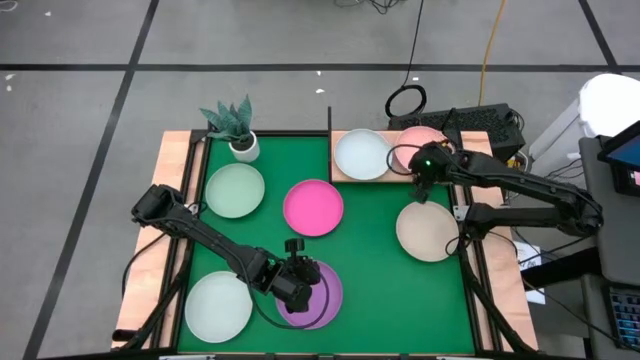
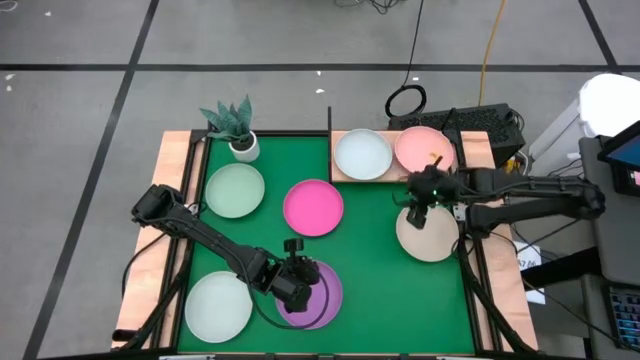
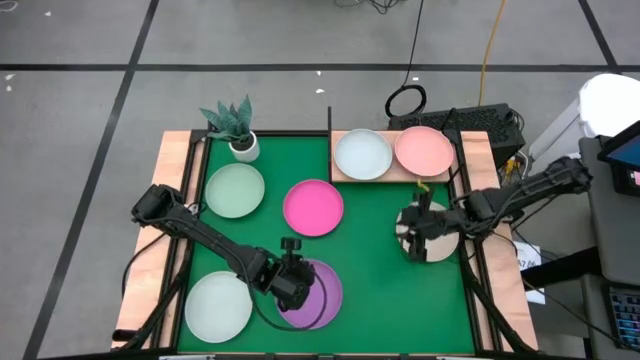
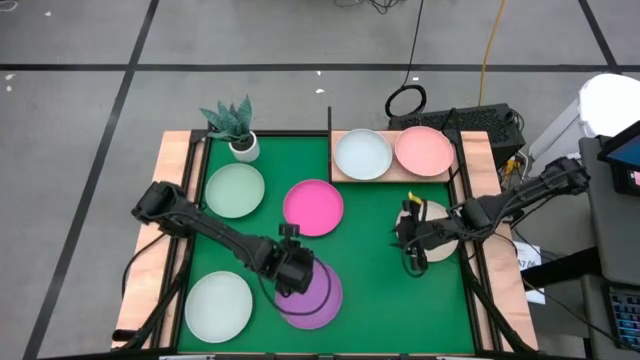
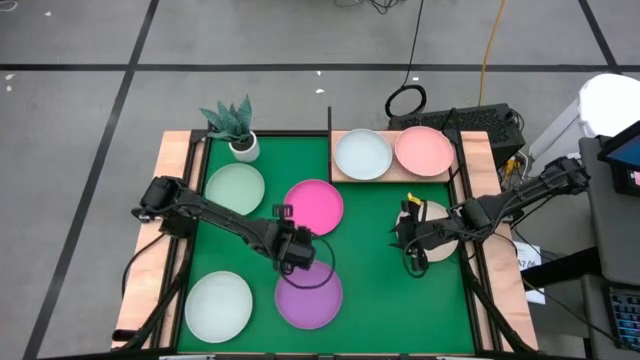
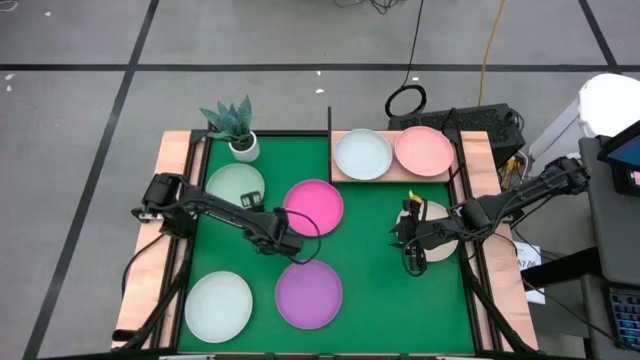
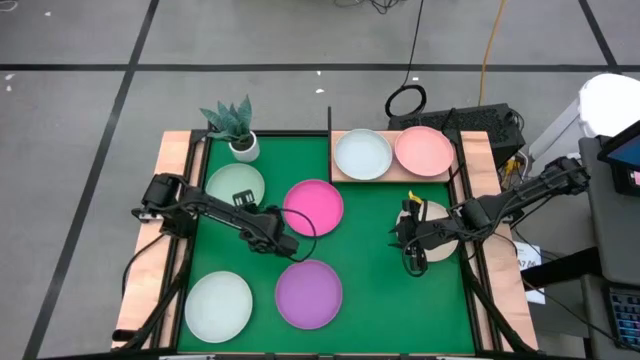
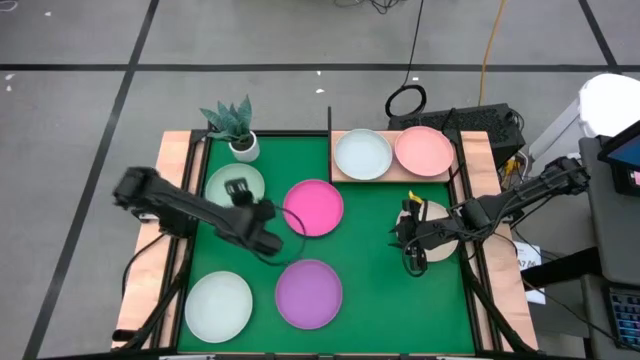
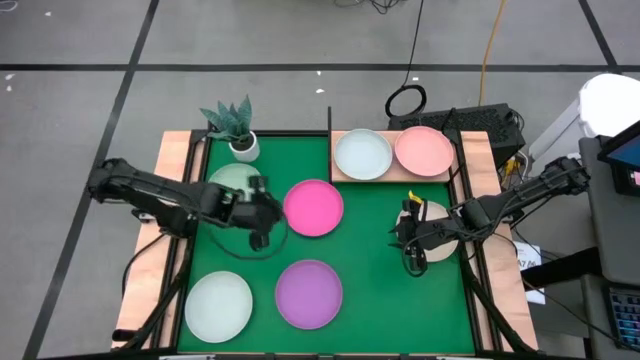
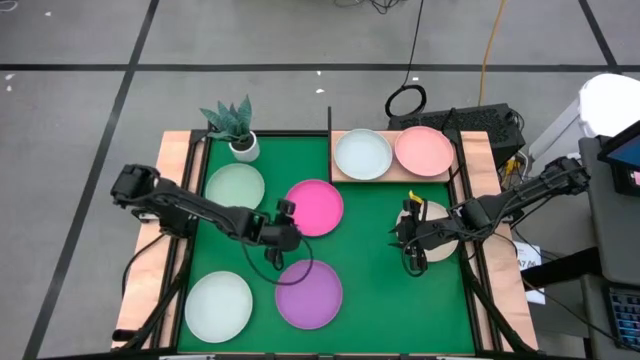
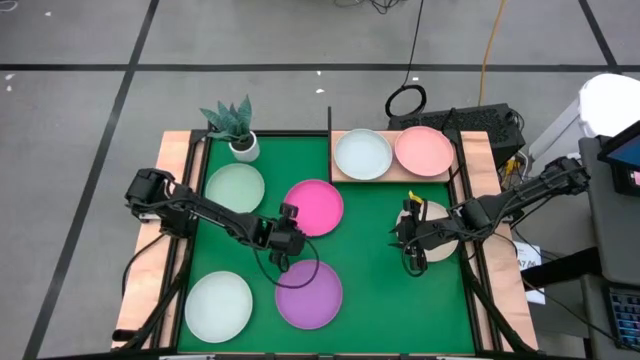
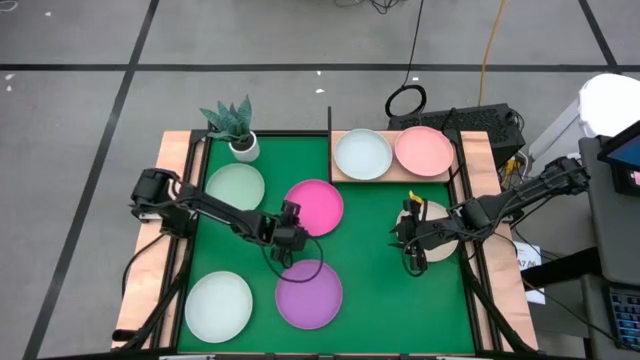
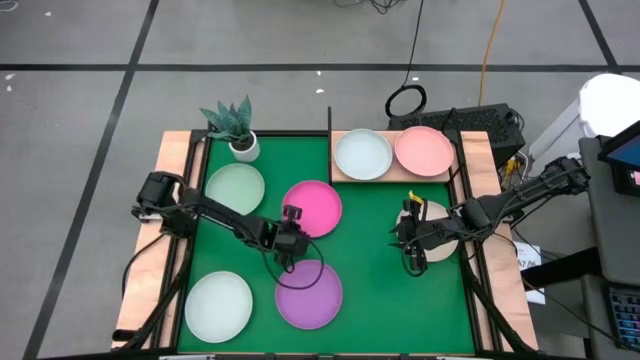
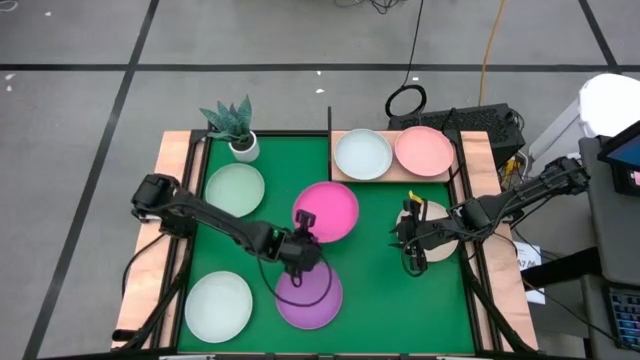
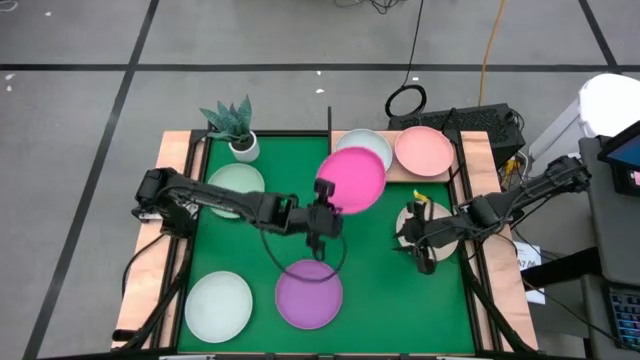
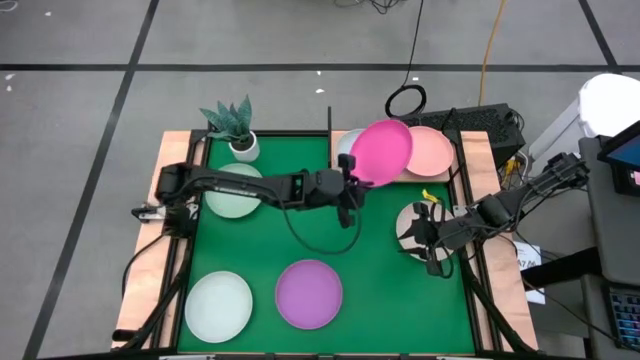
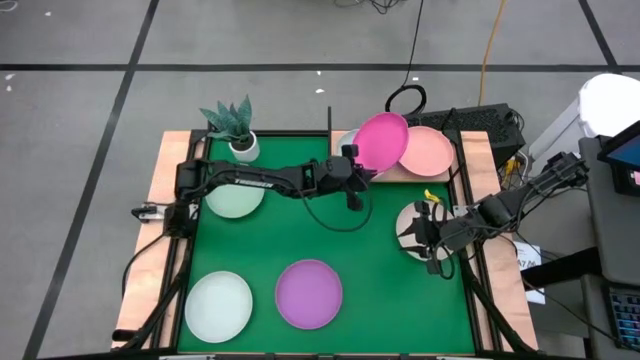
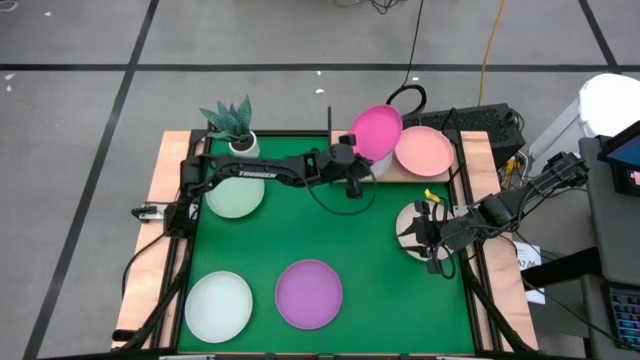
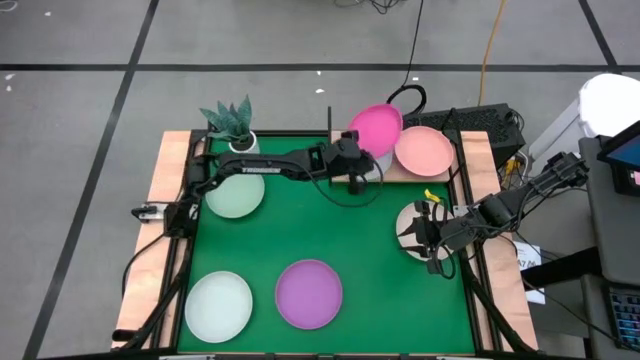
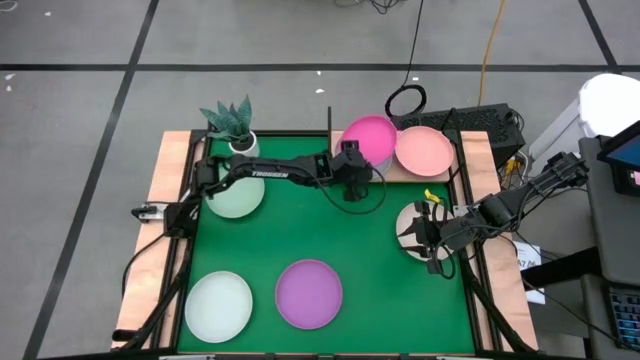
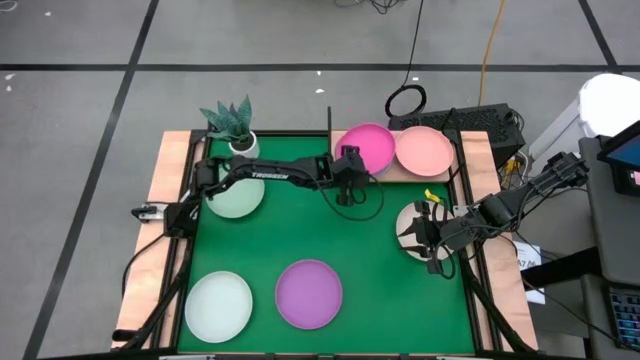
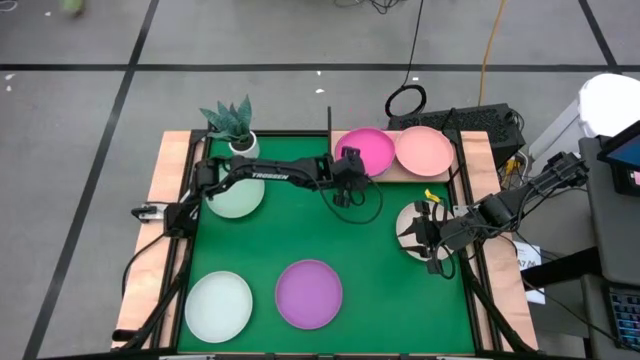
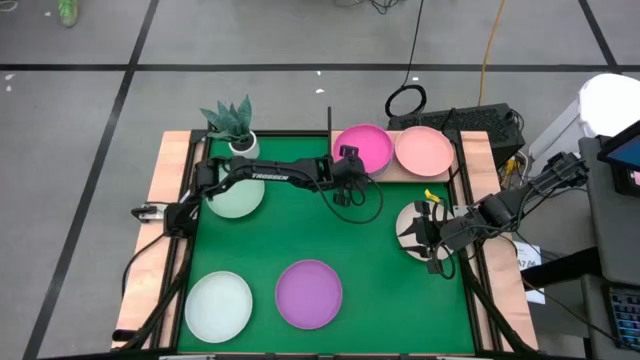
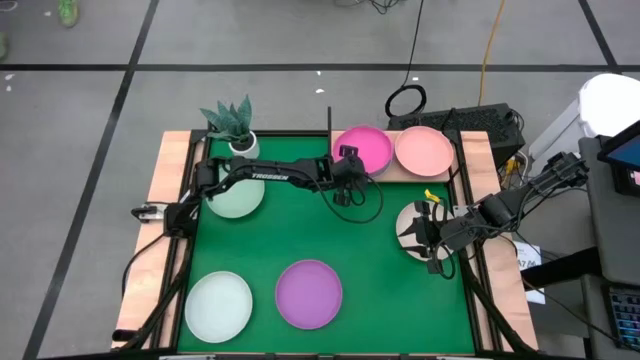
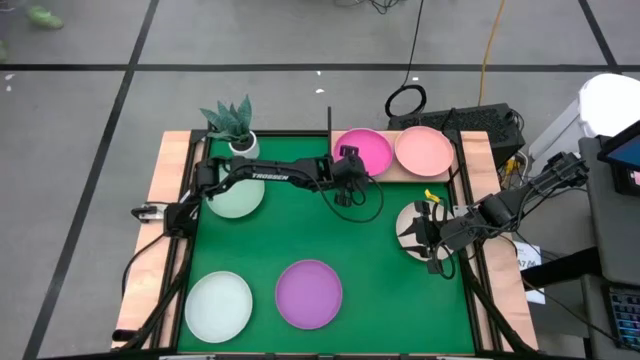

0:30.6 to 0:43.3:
Task: Place and stack plates onto a shelf
Stack the pink plate on top of the gray plate on the shelf

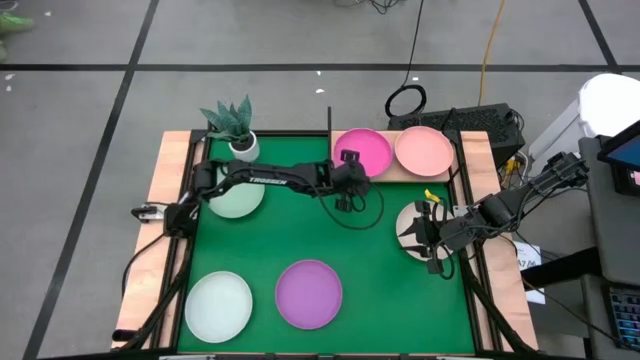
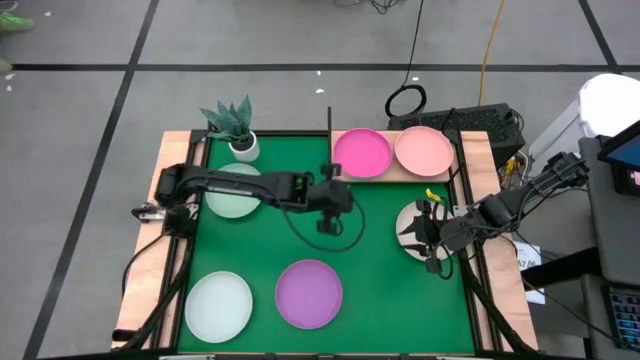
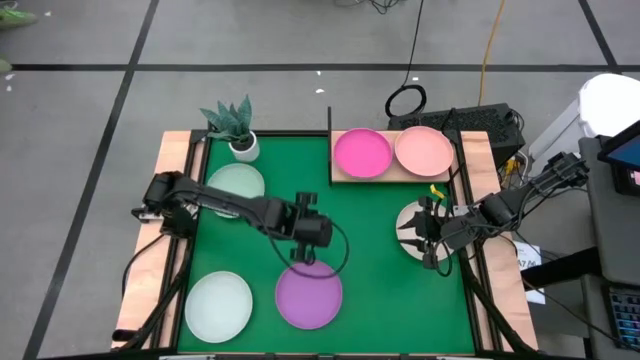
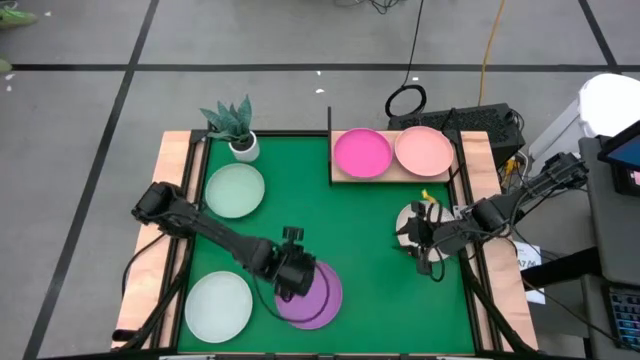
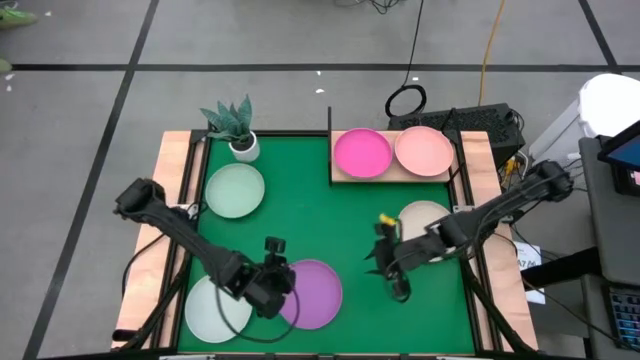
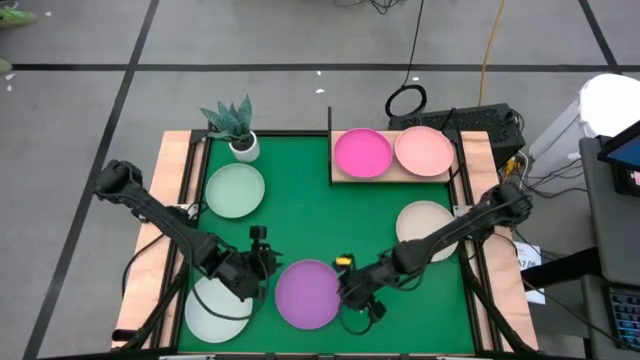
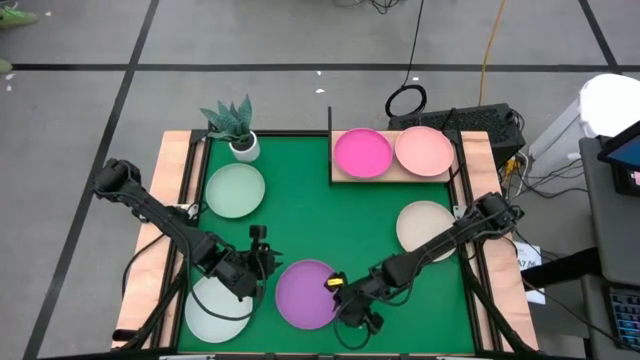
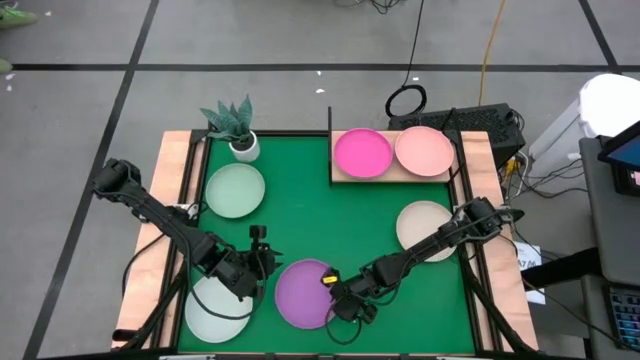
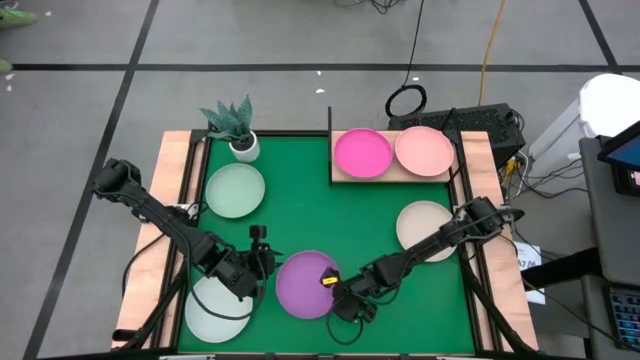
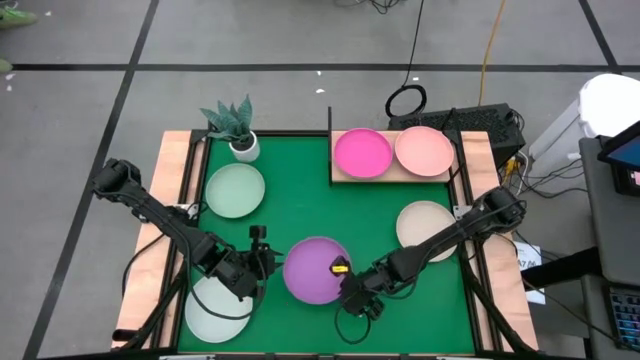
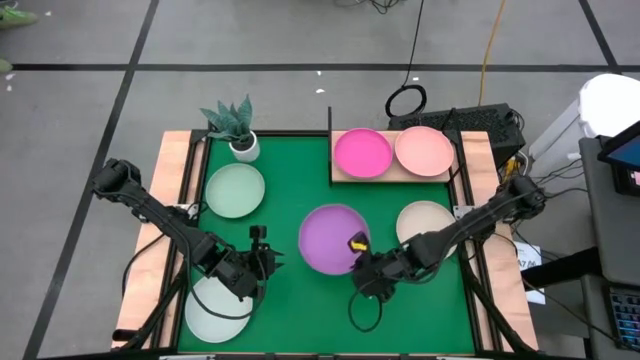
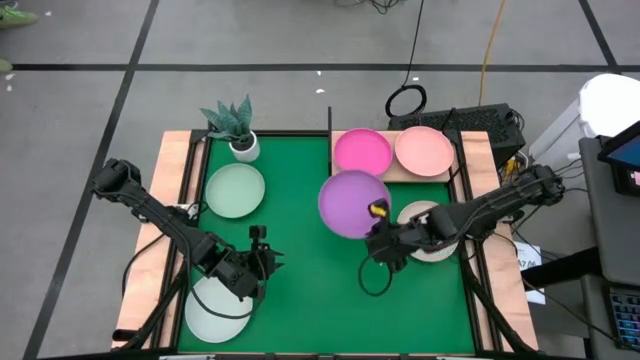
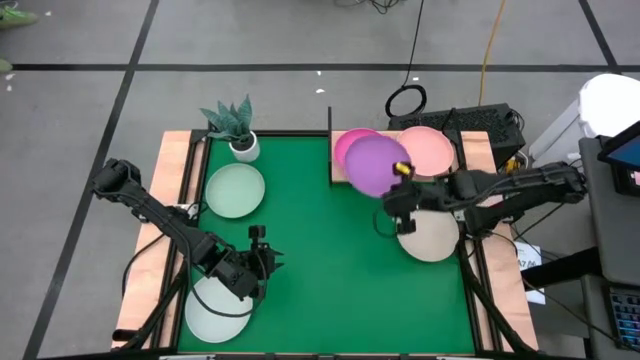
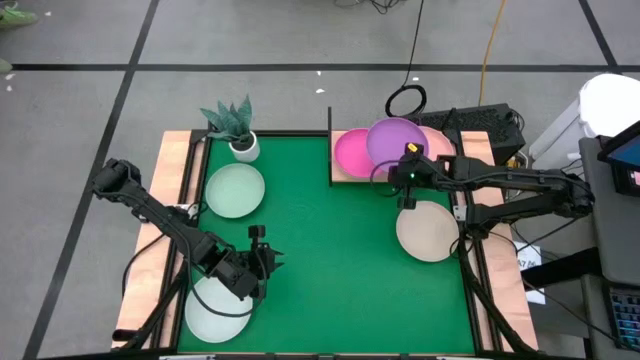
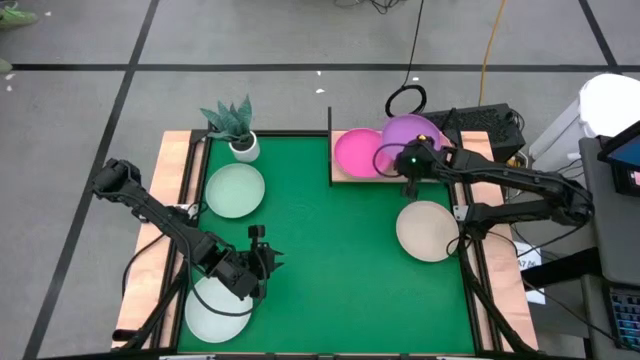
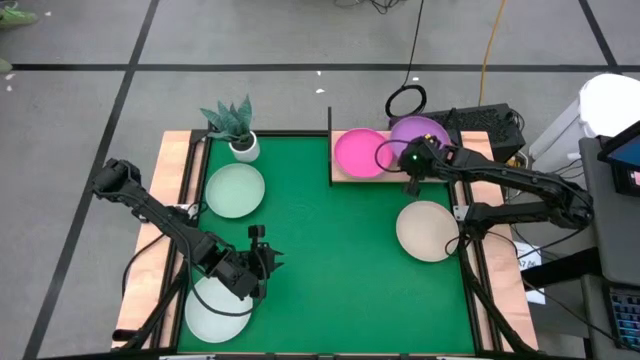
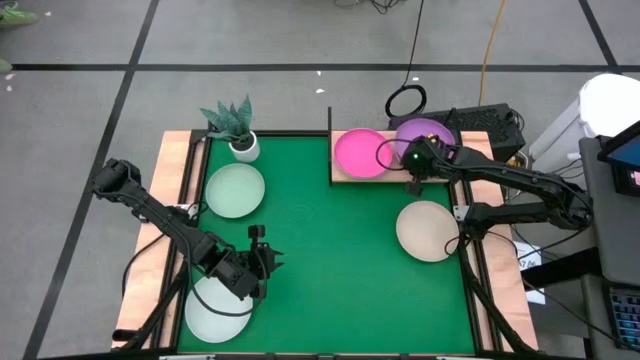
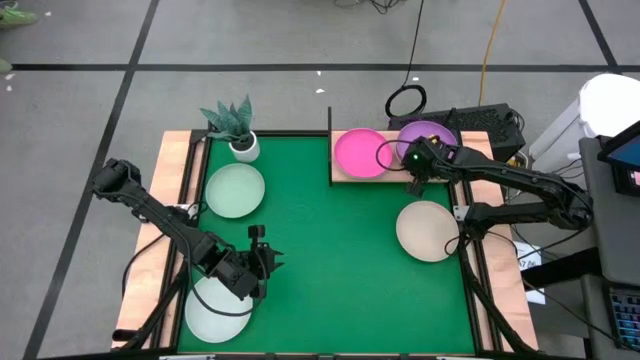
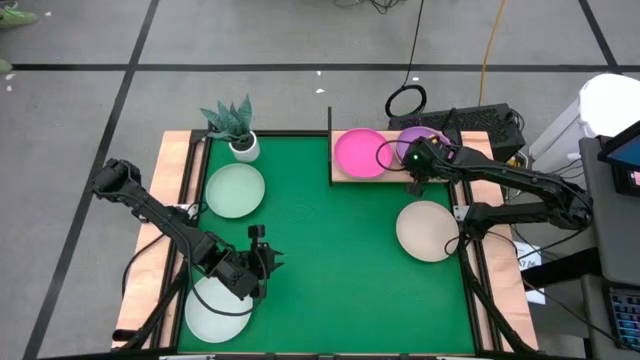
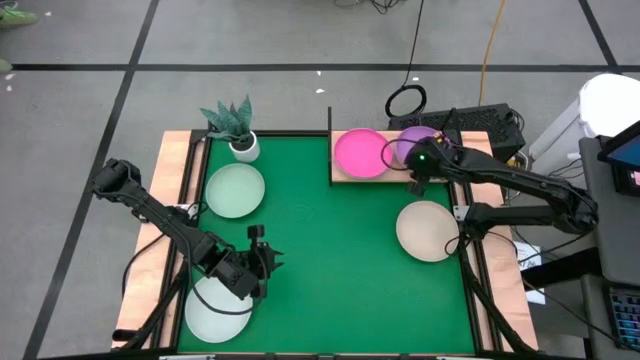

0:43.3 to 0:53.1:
Stack the purple plate on top of the orange plate on the shelf
